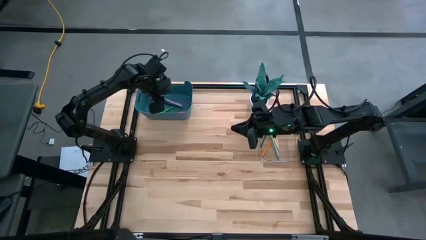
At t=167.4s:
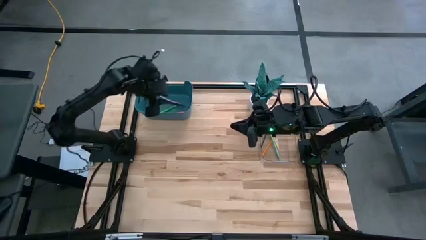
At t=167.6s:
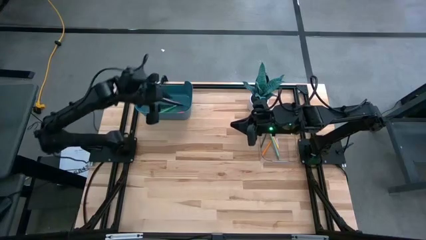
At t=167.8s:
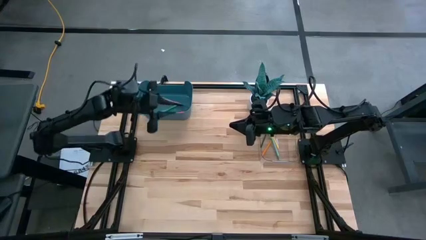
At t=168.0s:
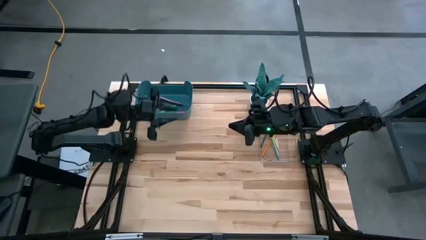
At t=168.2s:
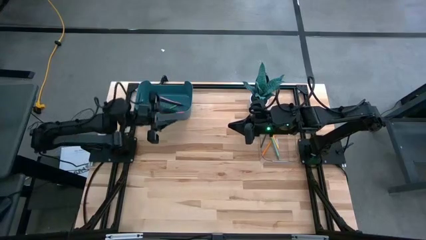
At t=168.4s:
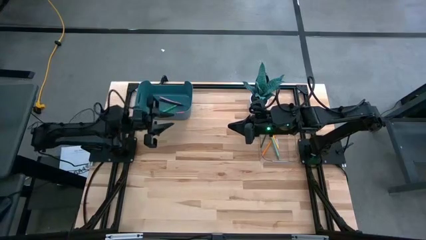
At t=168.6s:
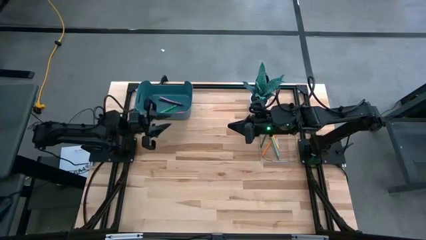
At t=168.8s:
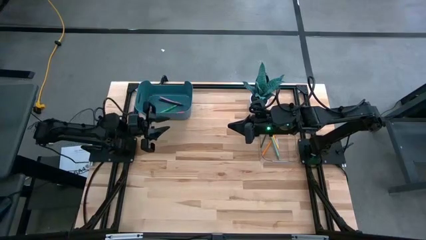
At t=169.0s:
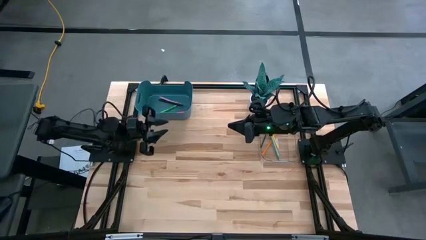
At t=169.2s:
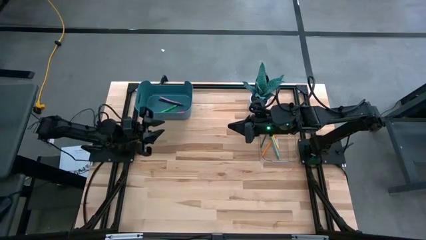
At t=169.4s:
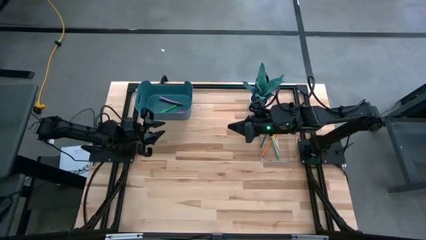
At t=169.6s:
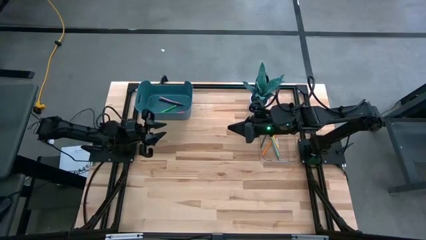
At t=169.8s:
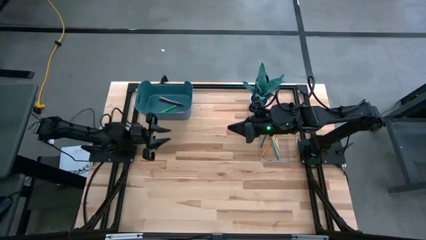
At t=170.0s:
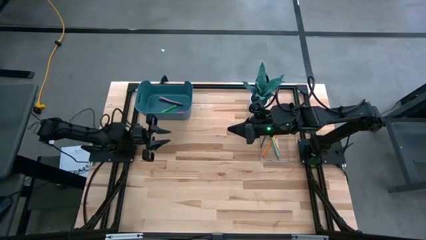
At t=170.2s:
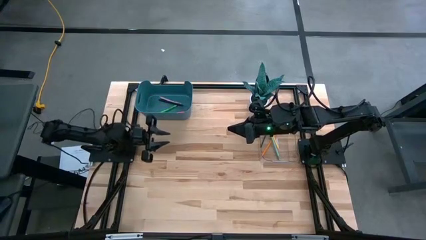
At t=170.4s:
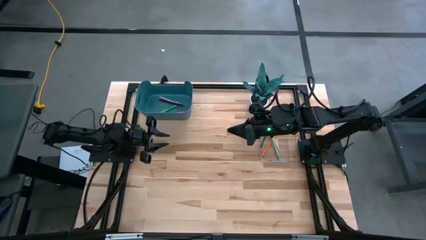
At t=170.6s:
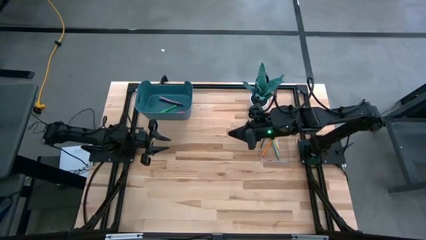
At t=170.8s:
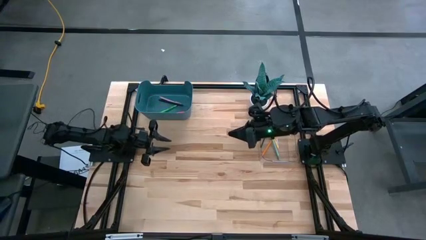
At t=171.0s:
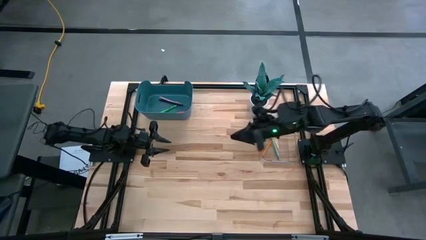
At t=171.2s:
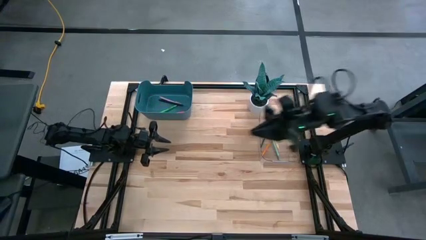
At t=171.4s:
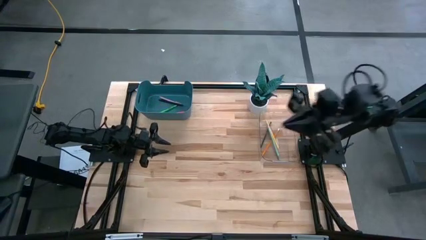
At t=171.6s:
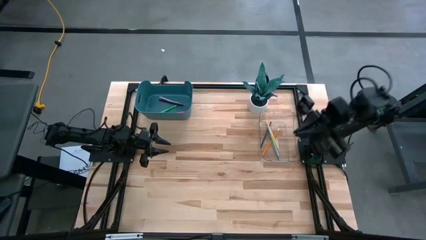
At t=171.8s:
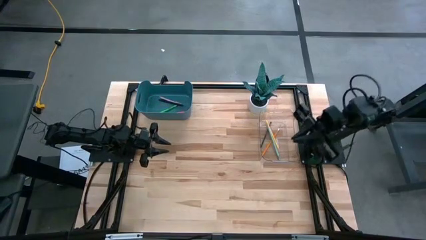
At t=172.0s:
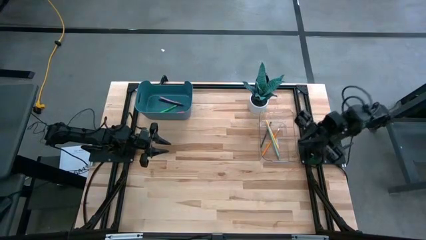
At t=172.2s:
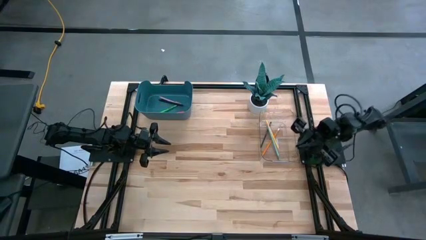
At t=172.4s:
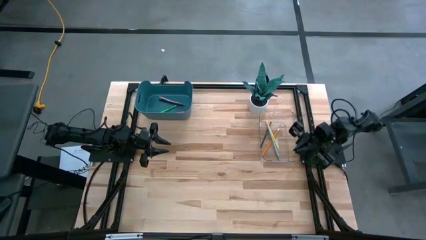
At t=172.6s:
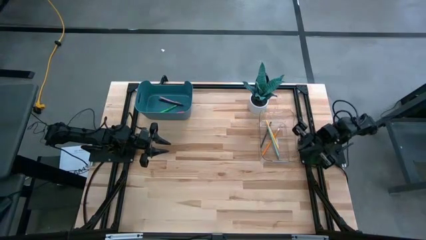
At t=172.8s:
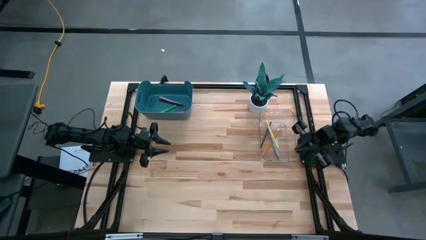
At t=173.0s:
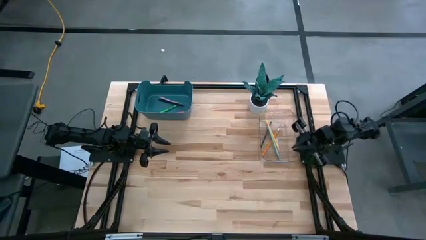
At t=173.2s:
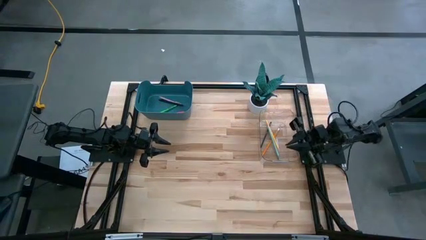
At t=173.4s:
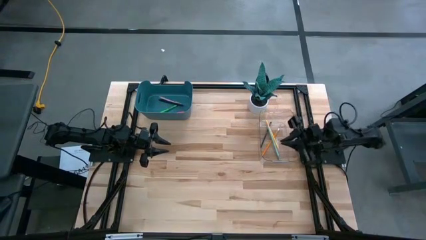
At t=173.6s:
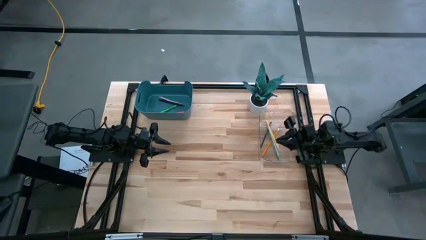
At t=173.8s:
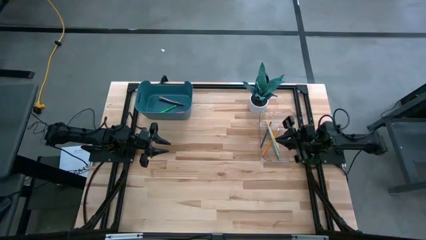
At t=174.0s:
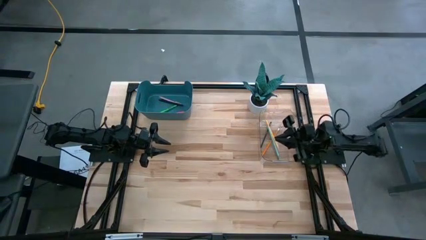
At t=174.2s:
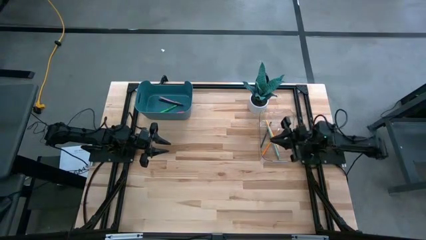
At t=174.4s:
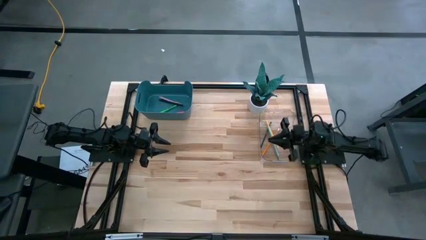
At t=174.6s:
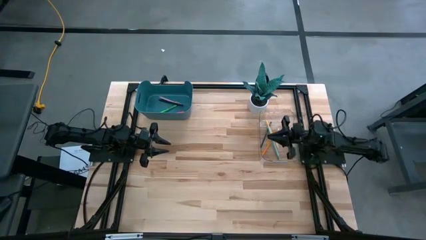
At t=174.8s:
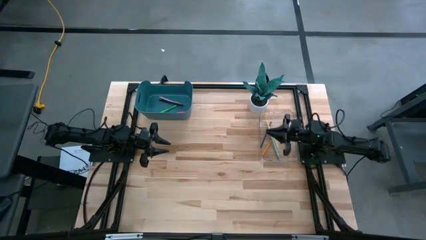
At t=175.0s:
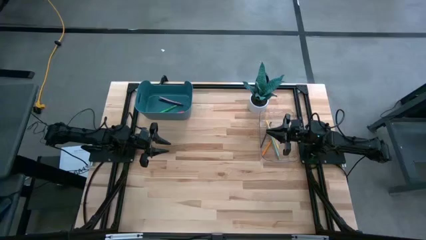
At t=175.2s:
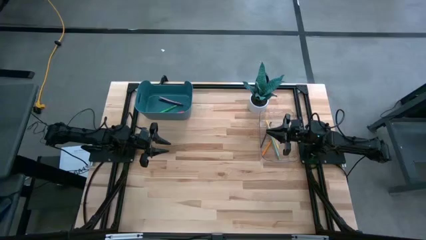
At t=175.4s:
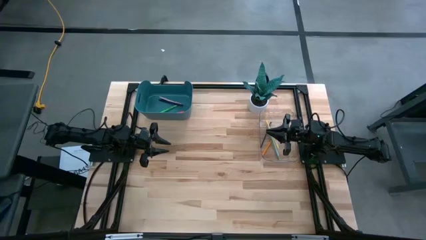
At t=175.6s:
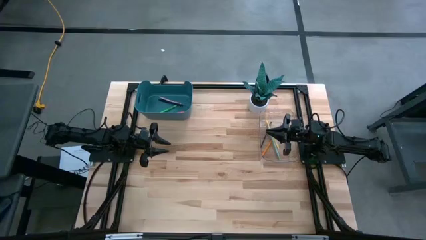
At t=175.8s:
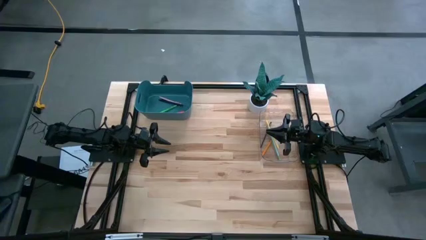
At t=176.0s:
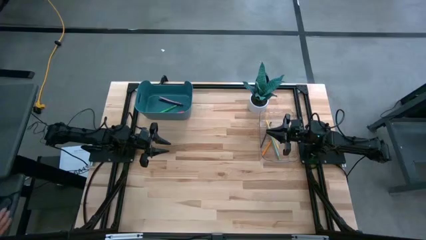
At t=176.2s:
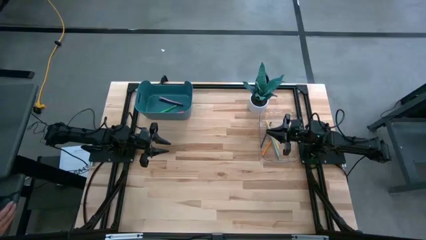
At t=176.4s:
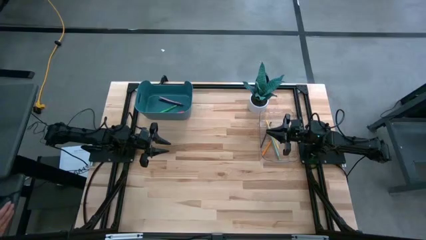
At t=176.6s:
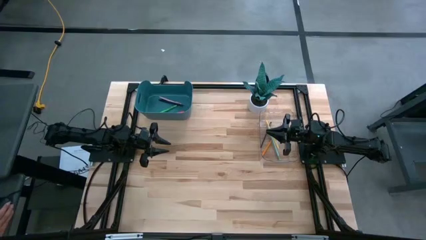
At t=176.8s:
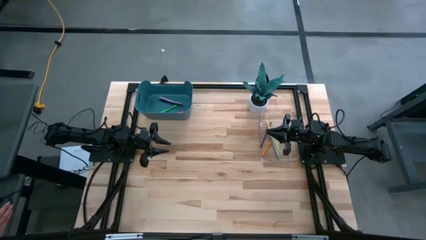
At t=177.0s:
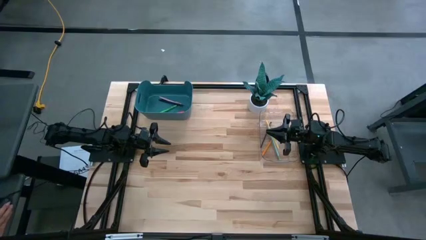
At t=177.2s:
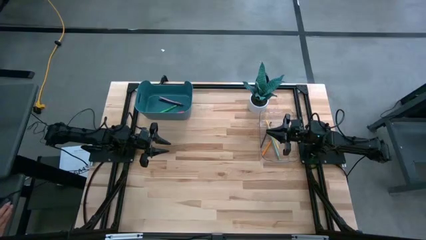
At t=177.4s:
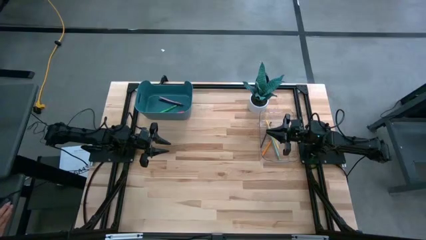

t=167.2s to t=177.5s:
Task: Sort pens & pencils
Return to Home Position

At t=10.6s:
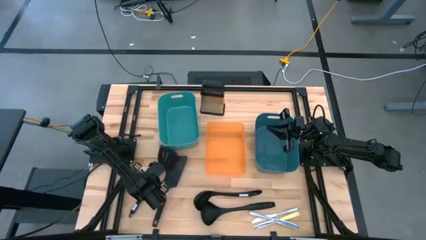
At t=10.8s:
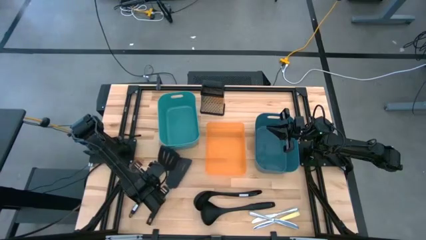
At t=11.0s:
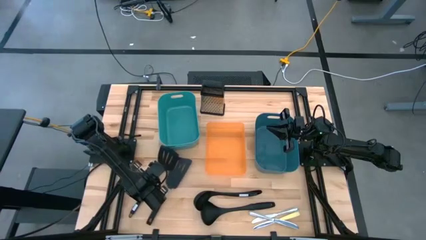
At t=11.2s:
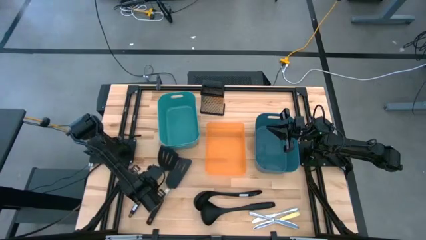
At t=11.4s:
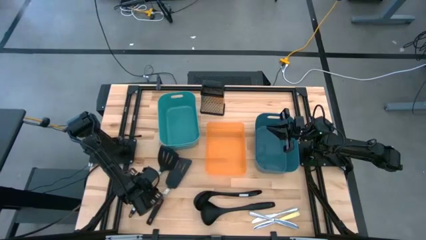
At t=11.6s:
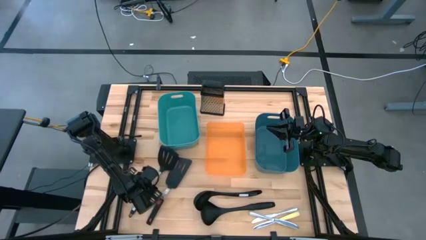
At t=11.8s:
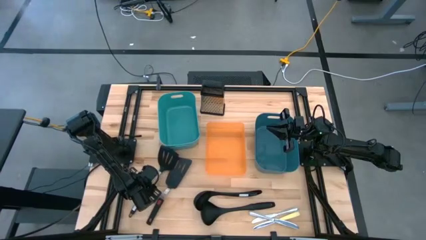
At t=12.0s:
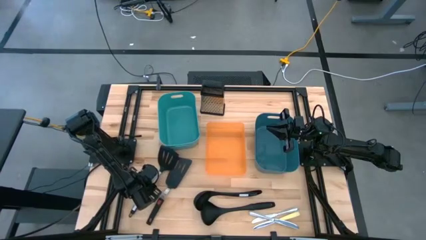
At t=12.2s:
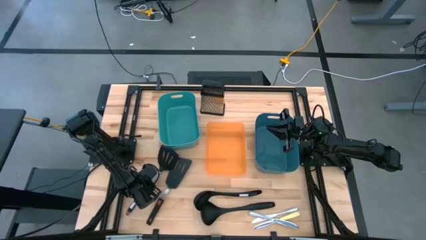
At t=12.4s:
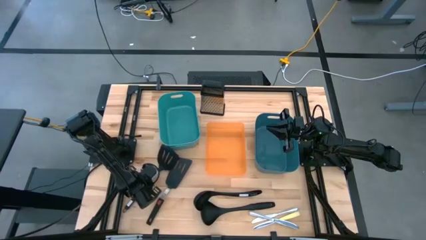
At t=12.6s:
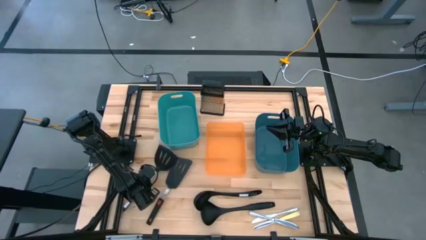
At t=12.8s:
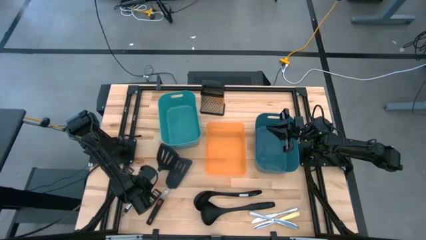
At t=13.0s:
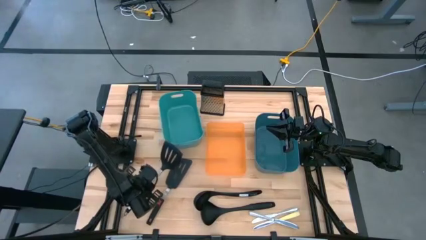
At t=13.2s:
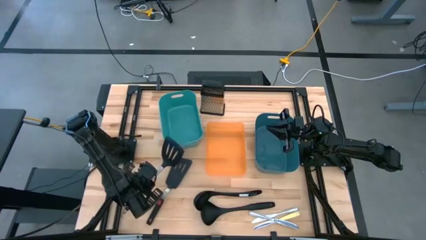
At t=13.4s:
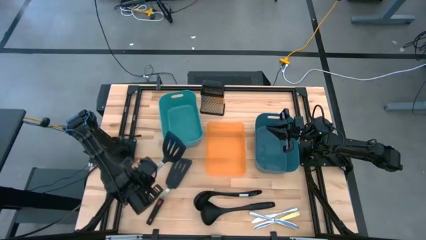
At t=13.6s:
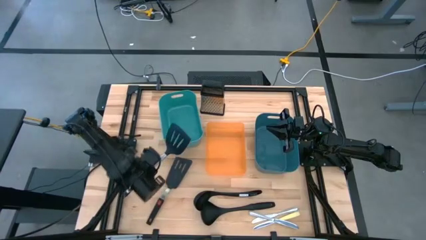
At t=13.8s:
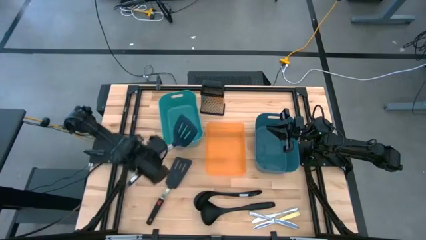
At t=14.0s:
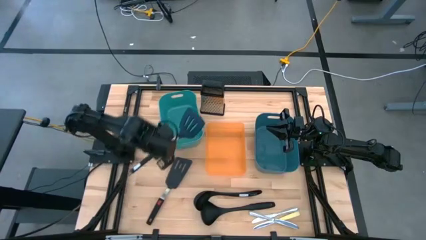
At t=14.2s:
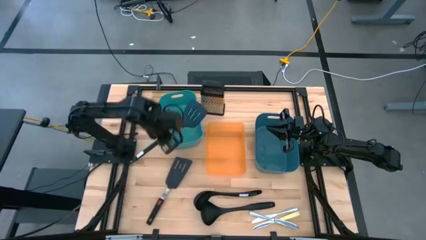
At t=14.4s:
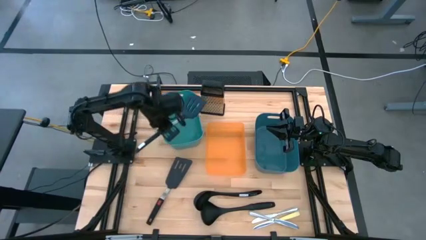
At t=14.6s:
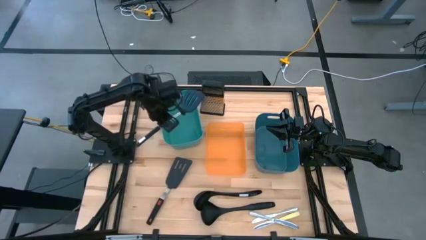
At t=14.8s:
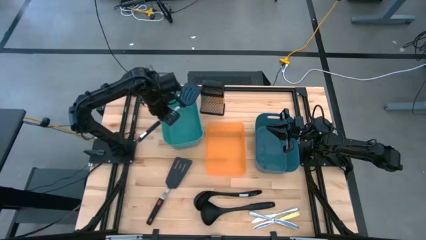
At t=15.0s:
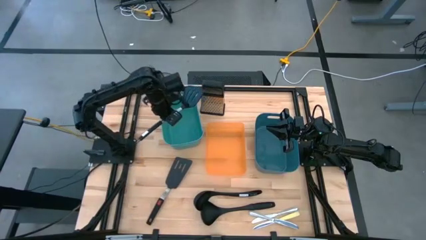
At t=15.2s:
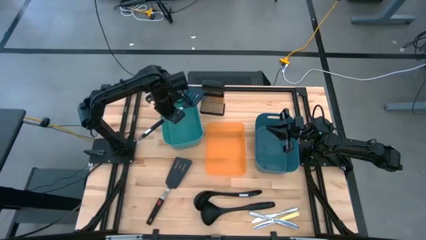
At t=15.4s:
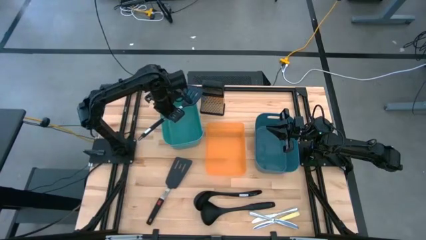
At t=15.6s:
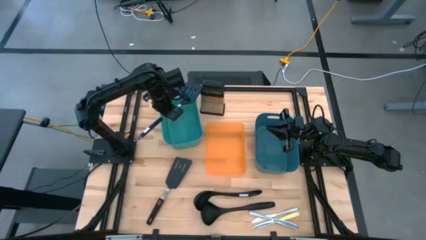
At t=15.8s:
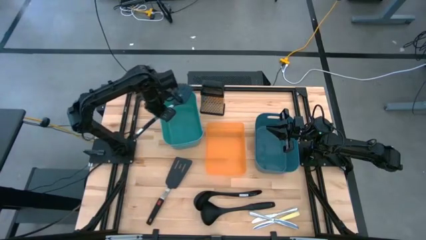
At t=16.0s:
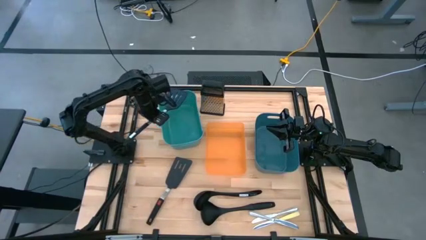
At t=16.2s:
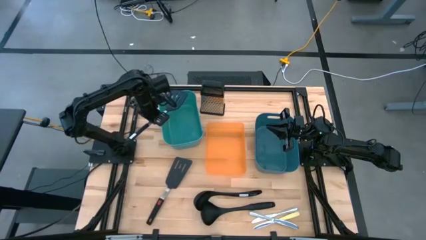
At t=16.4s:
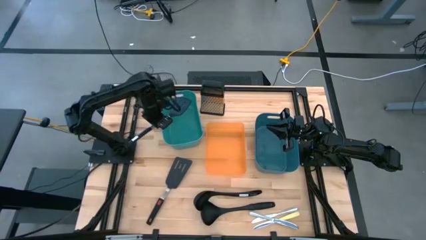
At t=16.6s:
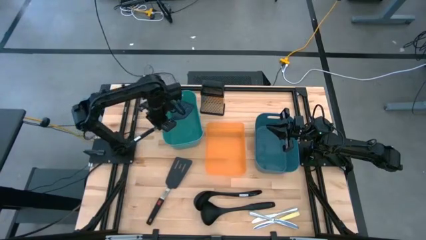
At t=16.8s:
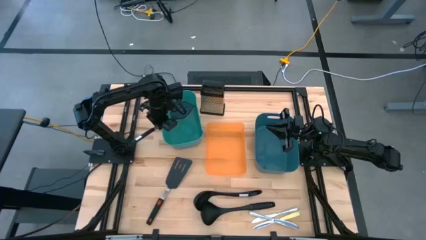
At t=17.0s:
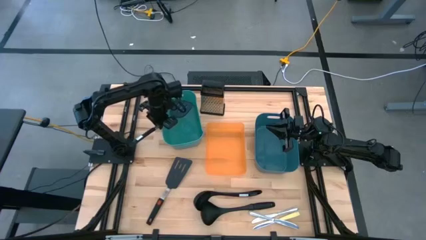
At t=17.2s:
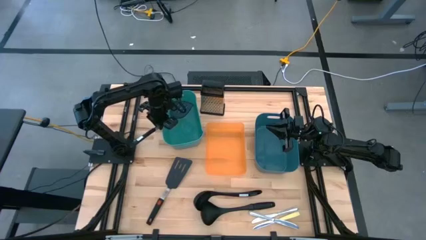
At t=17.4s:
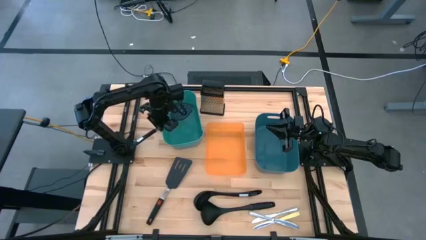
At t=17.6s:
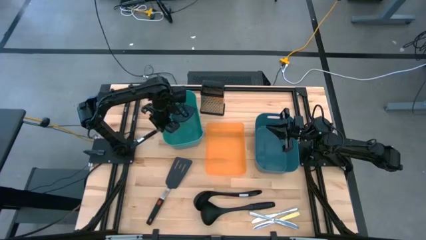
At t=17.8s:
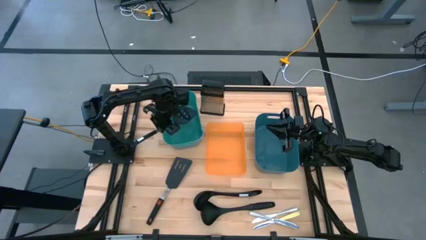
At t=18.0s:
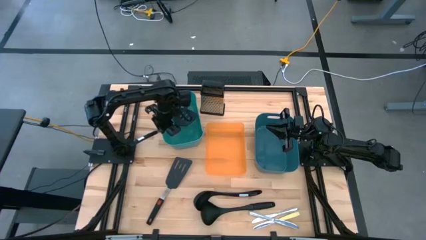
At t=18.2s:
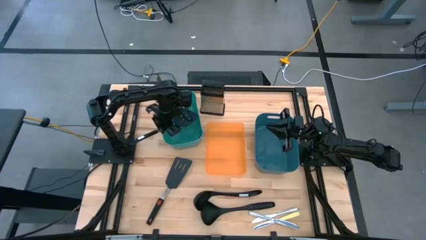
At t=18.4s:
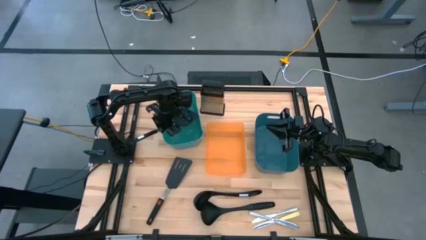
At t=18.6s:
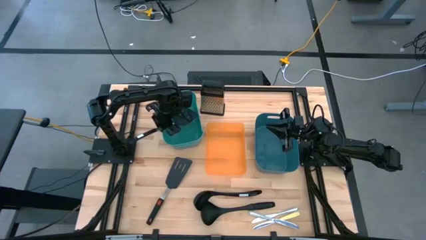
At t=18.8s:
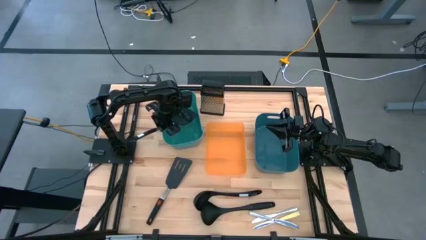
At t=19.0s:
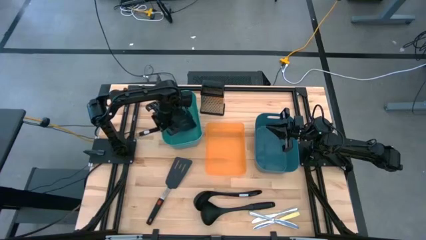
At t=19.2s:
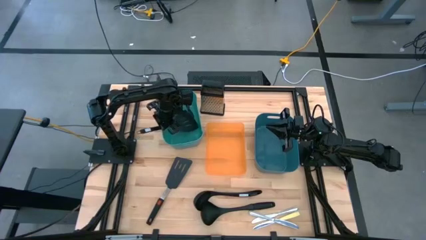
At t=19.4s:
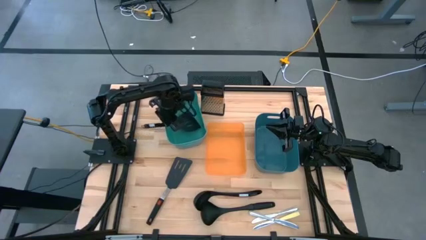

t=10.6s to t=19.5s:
Task: Pick & Place Kitchen Items
Put the black spatula into the green bin
